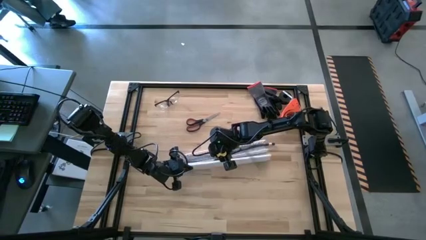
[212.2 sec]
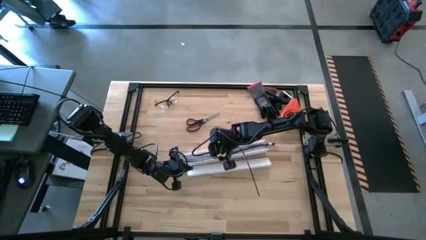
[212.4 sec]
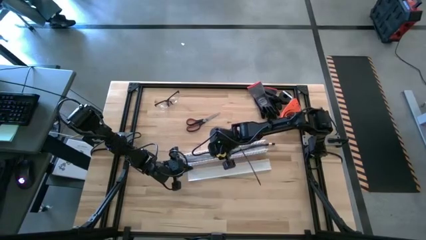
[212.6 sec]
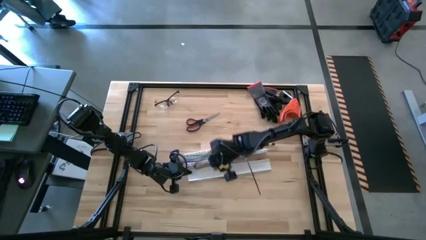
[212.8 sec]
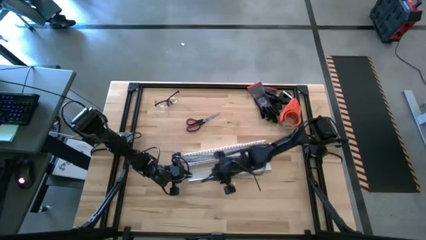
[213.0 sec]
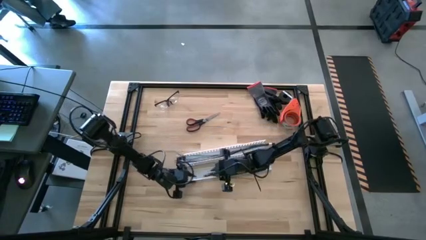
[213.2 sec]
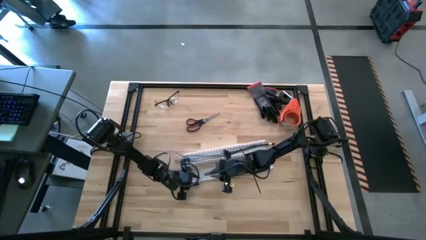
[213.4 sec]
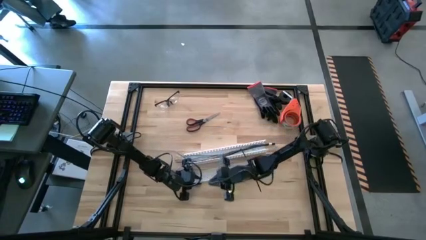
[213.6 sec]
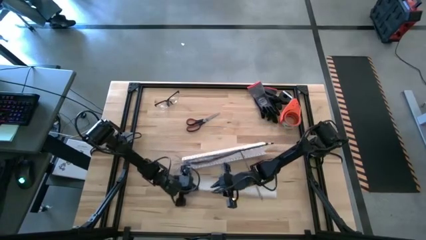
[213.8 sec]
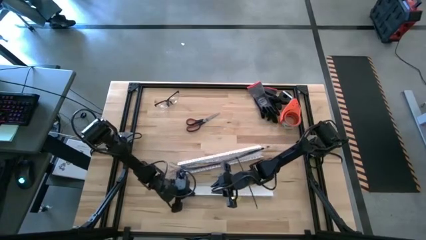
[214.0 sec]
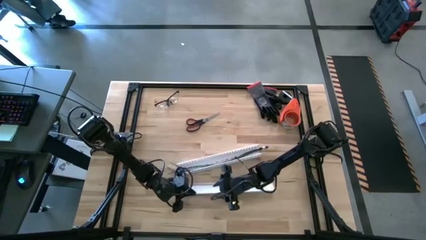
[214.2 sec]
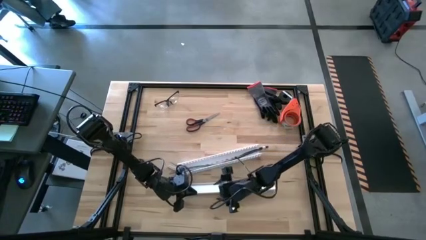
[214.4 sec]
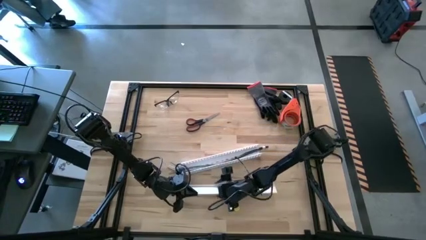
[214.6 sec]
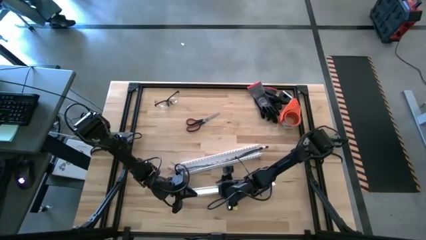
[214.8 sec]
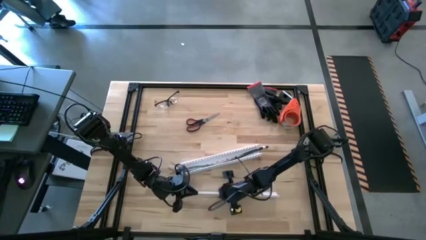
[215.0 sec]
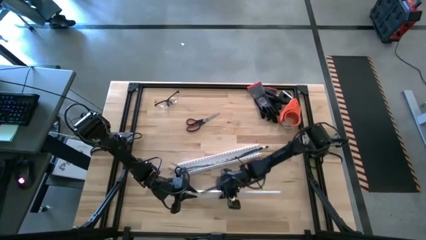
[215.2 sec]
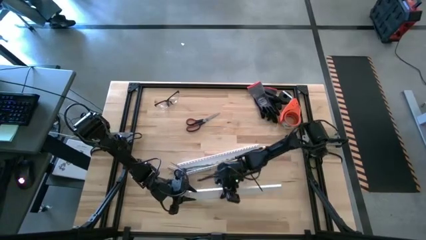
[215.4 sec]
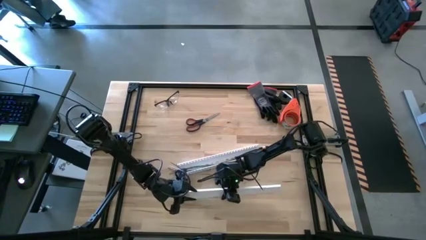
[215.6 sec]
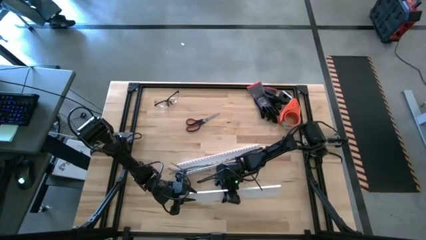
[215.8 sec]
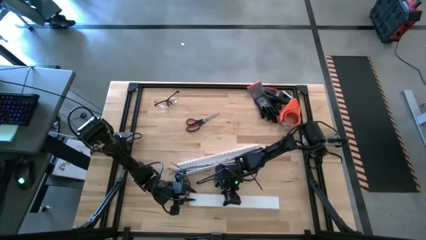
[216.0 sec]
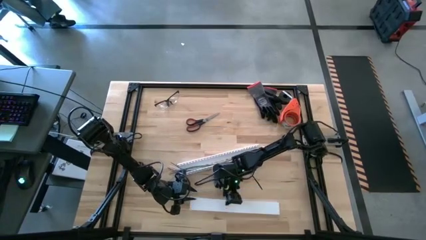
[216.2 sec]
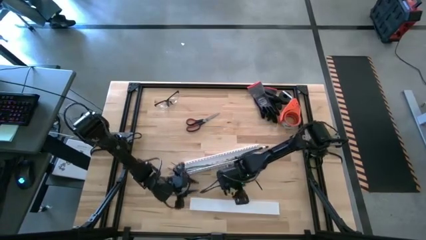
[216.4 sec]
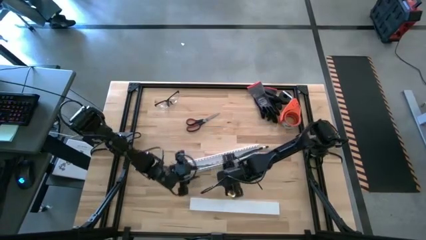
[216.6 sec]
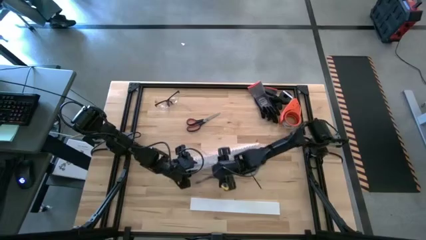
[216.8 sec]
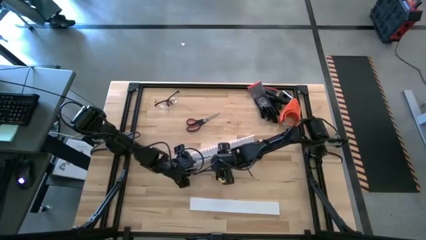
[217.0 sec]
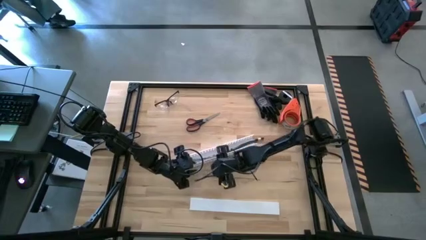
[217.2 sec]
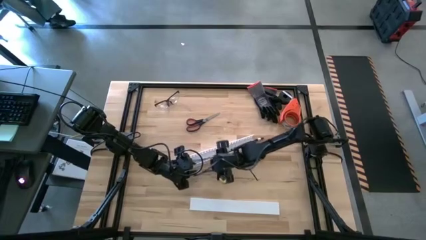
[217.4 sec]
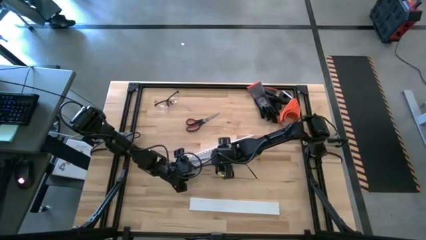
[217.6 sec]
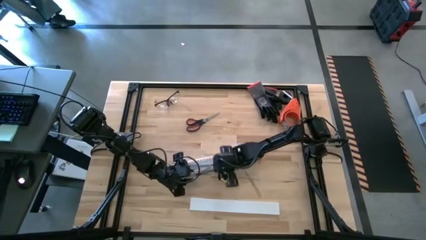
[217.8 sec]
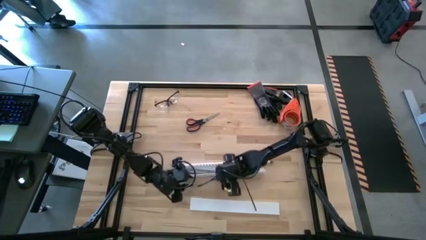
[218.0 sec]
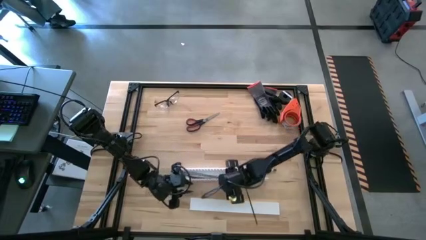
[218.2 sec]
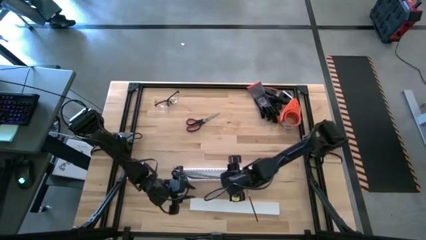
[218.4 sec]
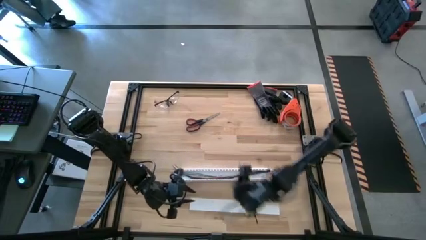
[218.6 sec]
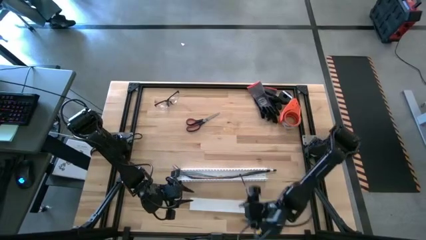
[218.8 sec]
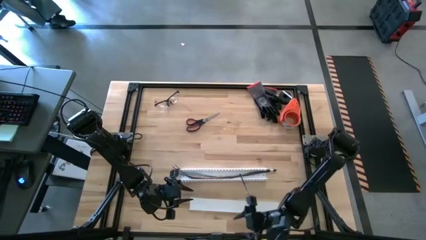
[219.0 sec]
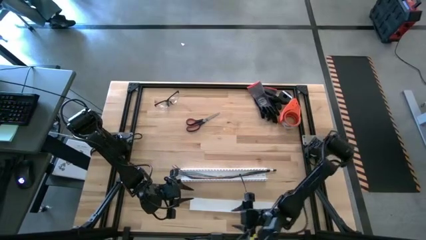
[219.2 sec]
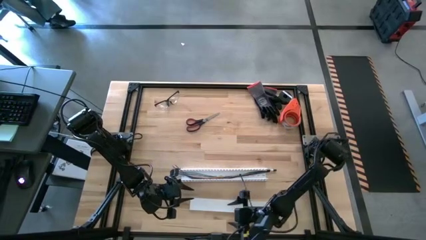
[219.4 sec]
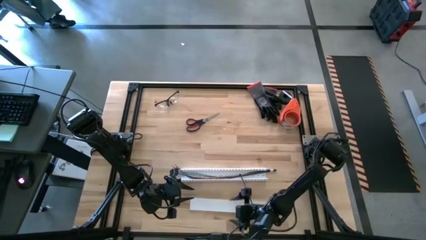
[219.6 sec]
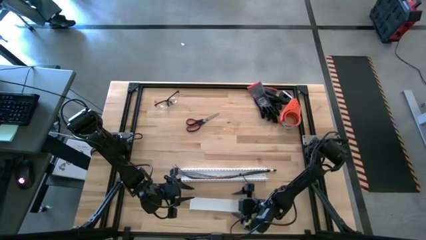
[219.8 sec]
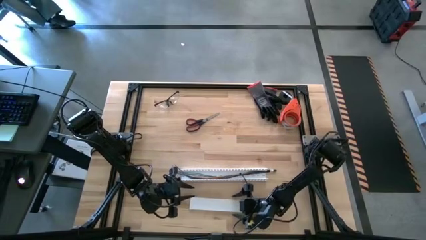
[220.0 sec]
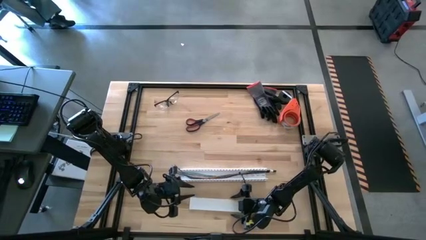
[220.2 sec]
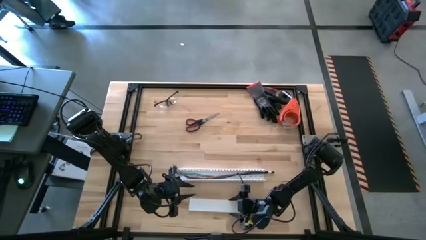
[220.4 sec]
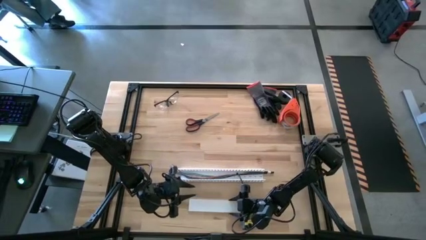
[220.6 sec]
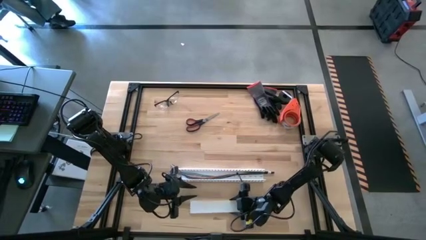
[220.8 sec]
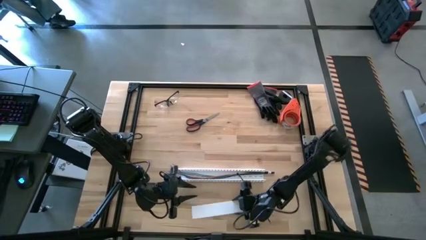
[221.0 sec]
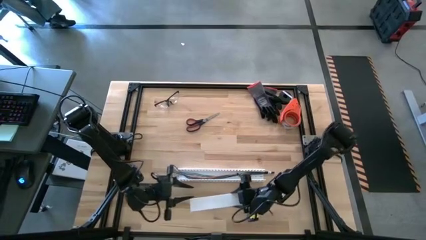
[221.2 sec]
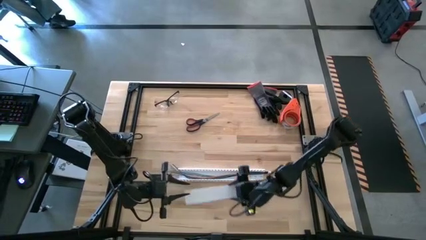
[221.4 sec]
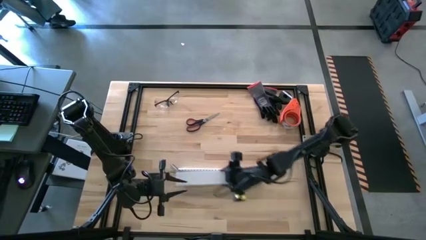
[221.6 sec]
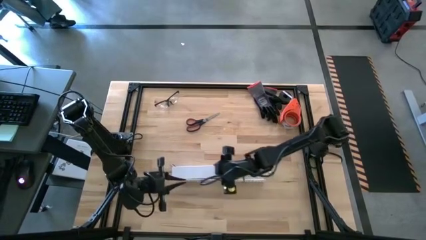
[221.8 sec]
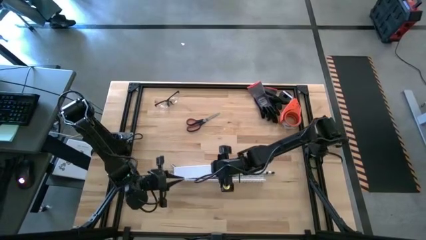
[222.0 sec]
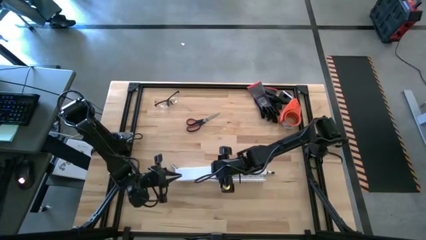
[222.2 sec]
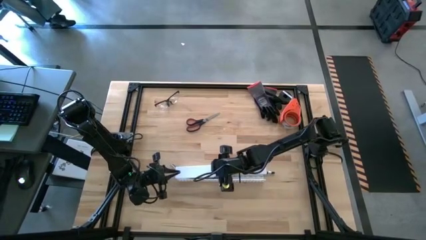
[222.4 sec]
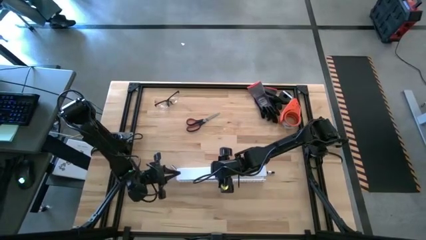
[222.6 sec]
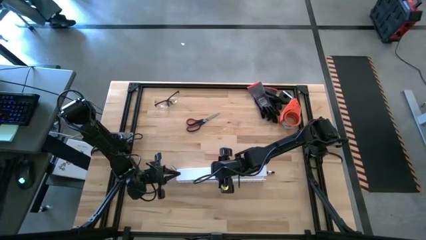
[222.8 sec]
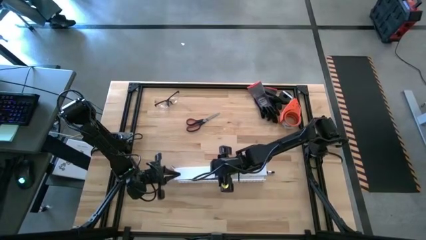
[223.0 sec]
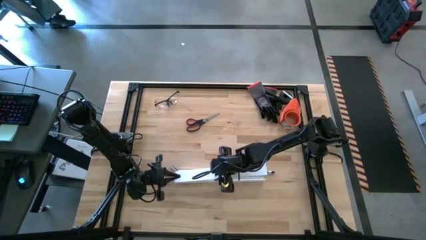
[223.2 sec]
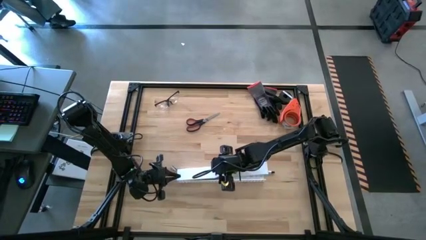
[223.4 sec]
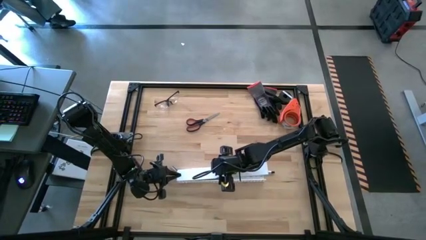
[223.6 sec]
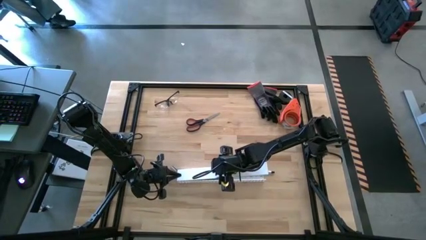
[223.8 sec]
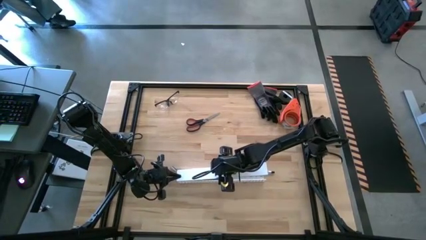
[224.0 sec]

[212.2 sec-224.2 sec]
Task: Ziptie cables
Close the white cable duct lid

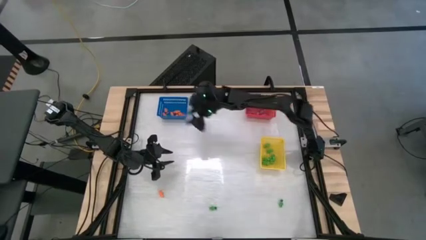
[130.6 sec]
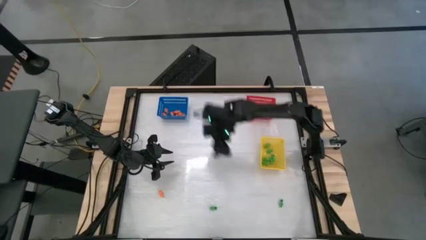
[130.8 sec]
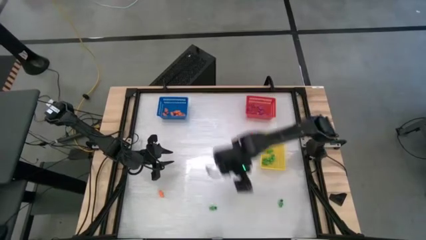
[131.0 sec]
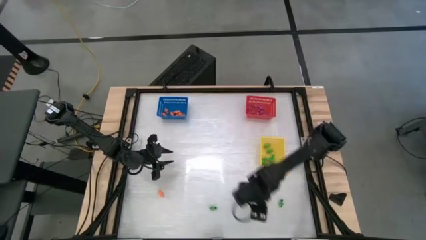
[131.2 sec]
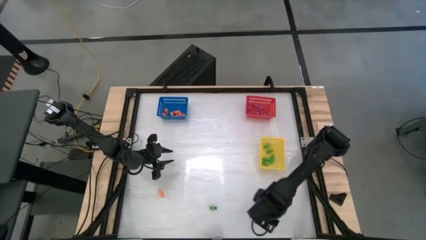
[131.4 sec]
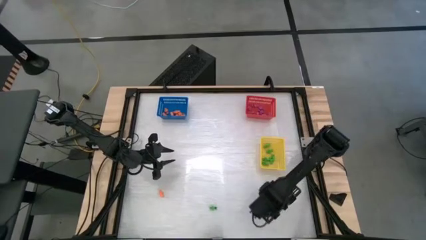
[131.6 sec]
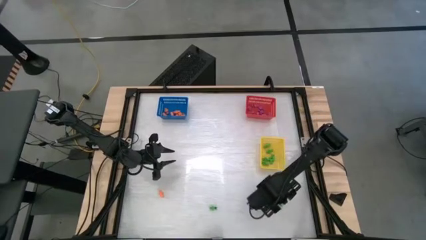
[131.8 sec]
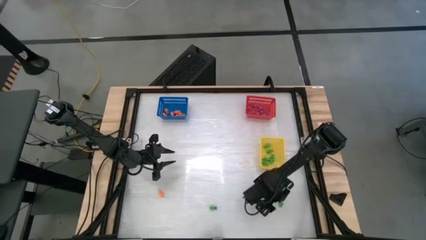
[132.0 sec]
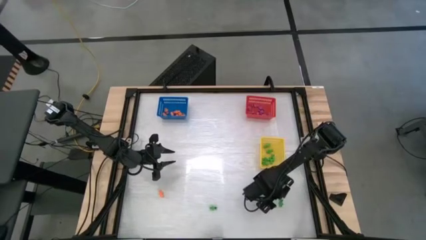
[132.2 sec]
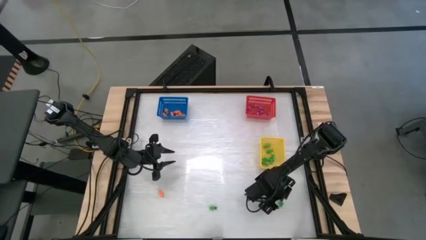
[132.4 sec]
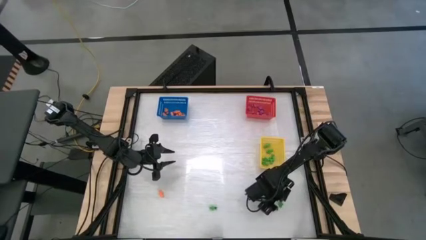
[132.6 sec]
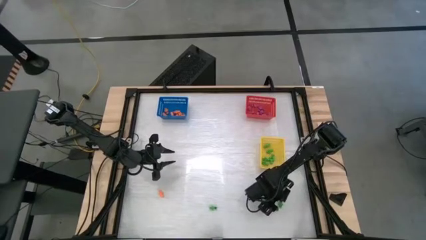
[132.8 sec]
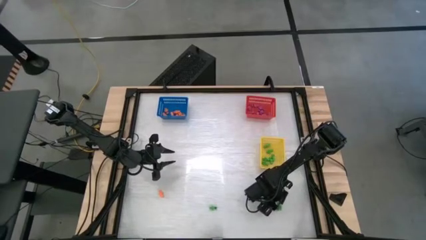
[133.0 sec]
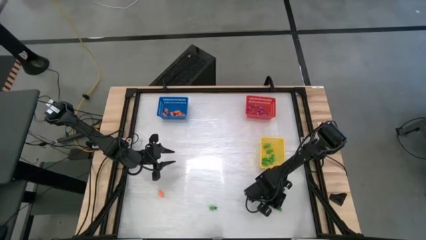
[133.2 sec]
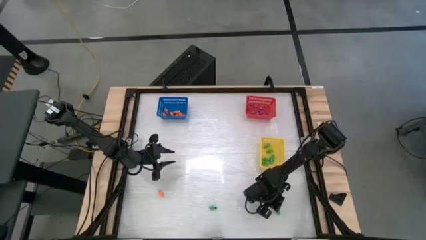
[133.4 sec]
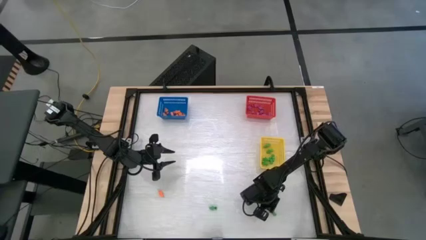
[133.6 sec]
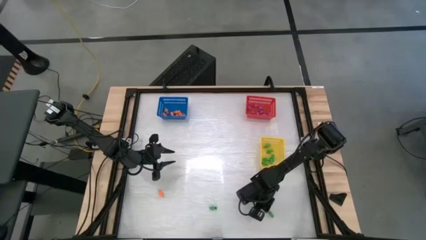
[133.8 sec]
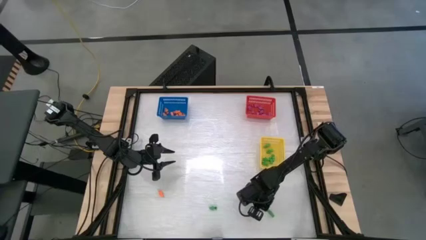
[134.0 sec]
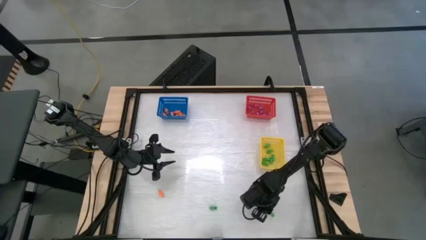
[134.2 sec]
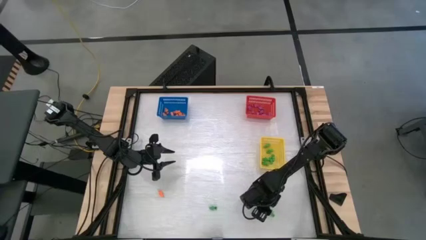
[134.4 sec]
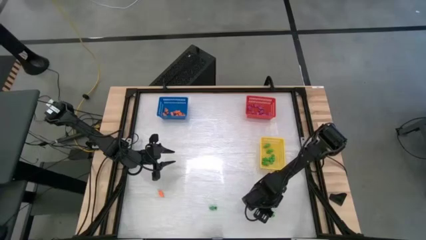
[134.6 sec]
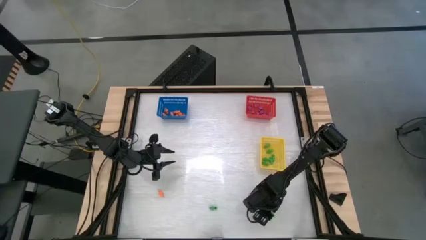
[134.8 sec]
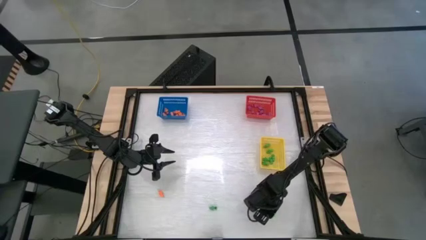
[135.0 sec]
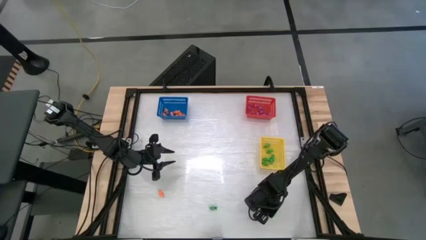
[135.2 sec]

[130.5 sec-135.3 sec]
Task: Sort Halloween decoration
Put the green skeleton toy into the red bin

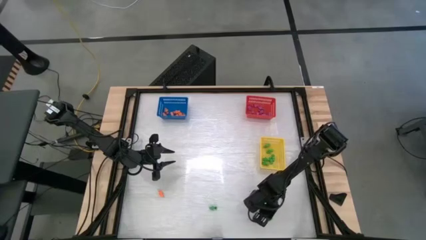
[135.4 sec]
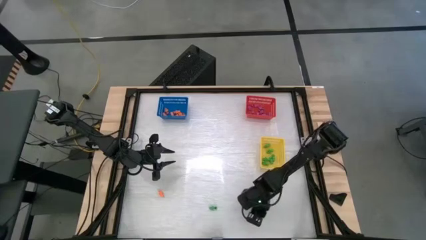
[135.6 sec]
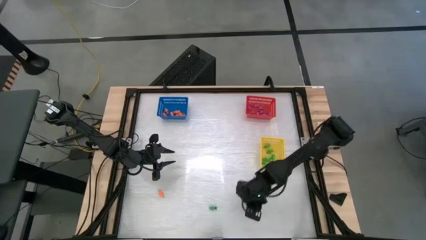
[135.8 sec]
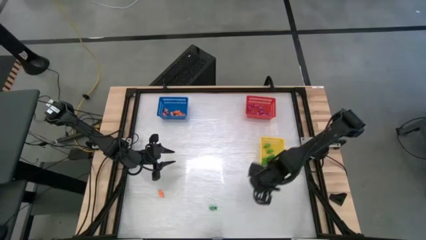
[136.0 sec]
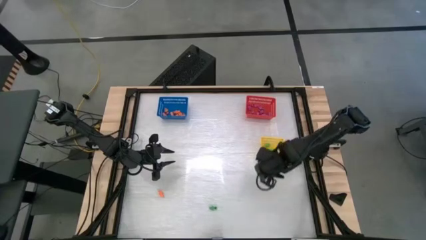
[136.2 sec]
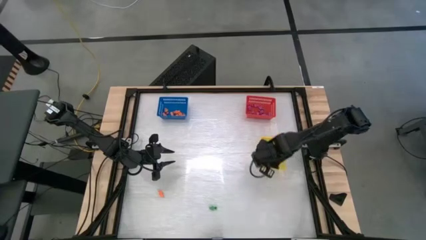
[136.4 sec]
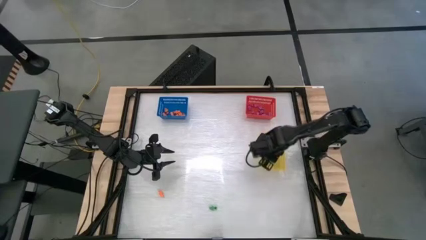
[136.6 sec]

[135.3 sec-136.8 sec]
Put the green skeleton toy into the red bin
